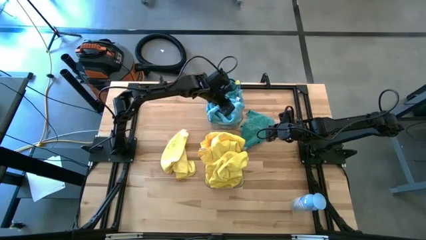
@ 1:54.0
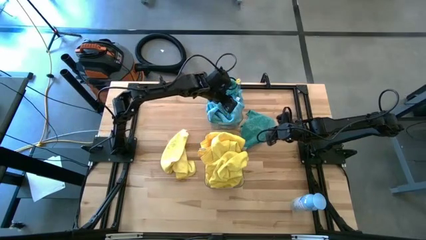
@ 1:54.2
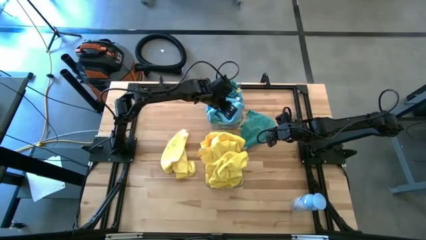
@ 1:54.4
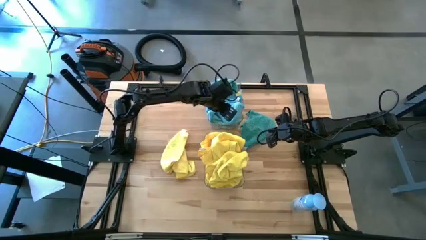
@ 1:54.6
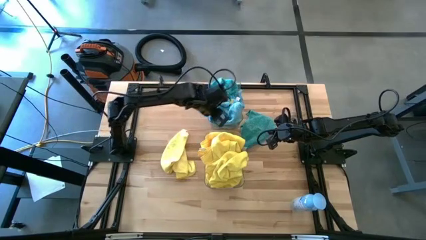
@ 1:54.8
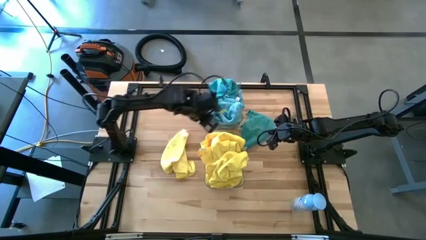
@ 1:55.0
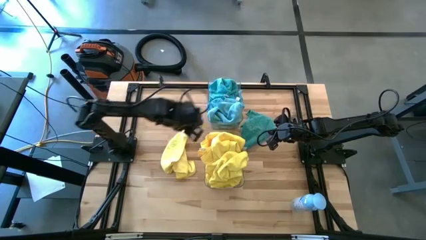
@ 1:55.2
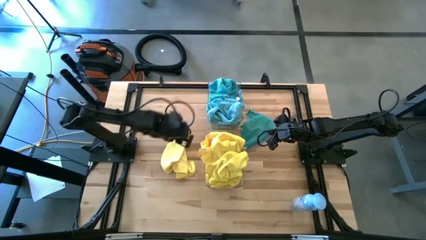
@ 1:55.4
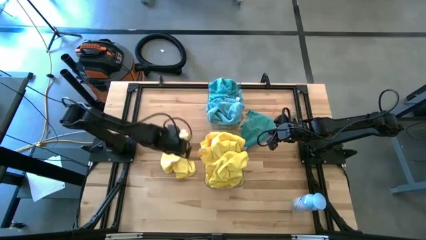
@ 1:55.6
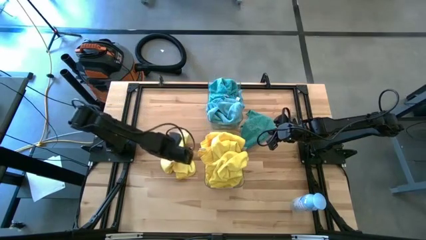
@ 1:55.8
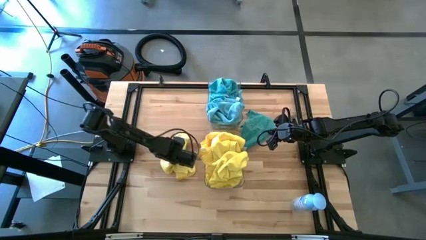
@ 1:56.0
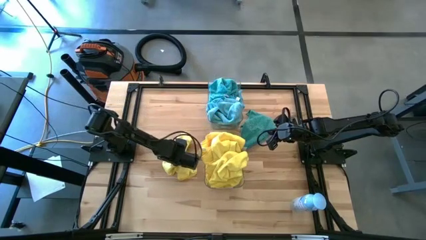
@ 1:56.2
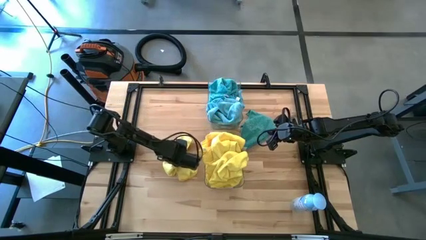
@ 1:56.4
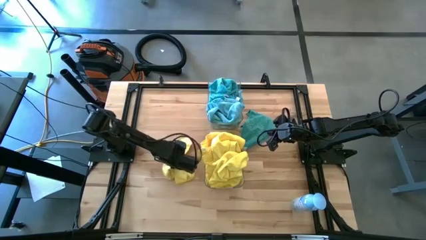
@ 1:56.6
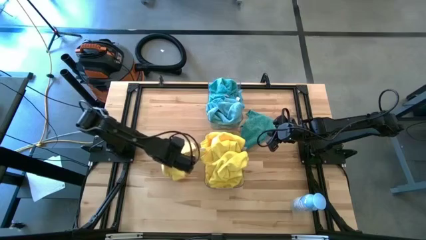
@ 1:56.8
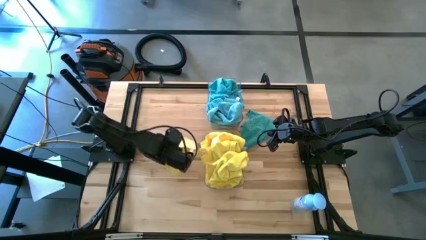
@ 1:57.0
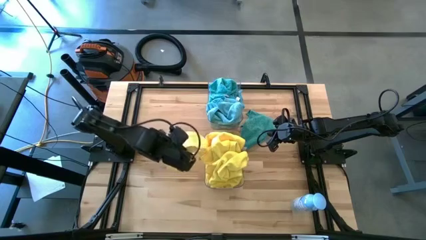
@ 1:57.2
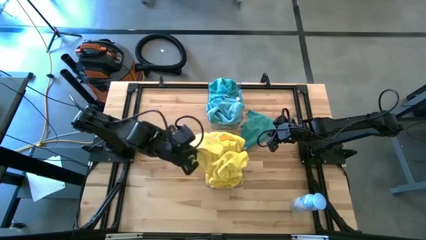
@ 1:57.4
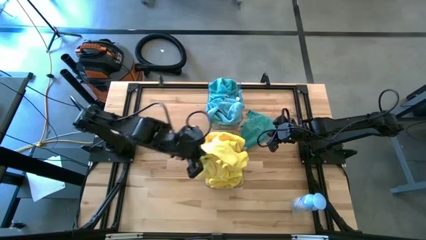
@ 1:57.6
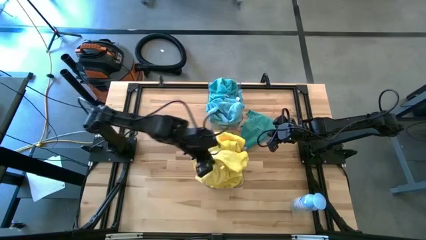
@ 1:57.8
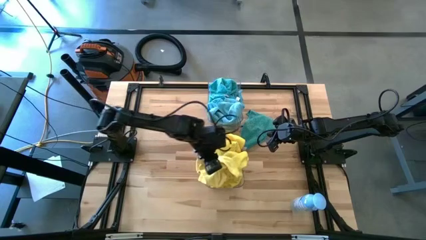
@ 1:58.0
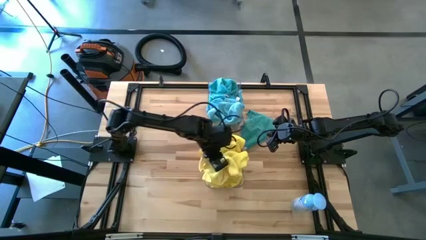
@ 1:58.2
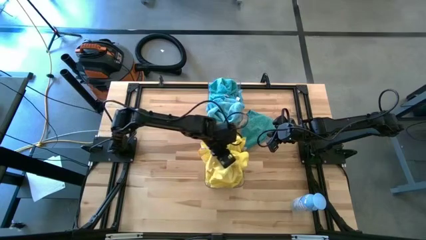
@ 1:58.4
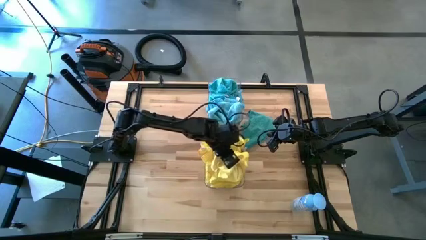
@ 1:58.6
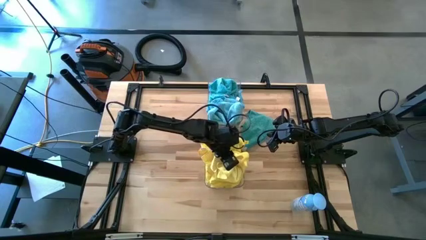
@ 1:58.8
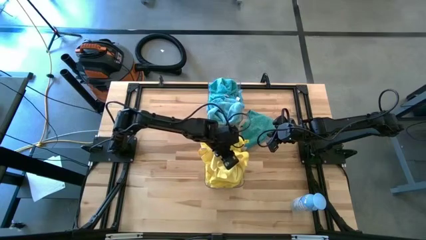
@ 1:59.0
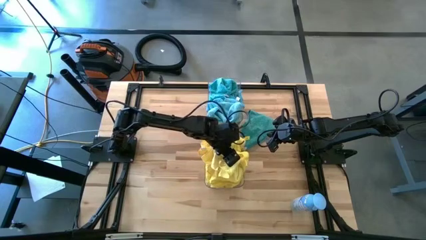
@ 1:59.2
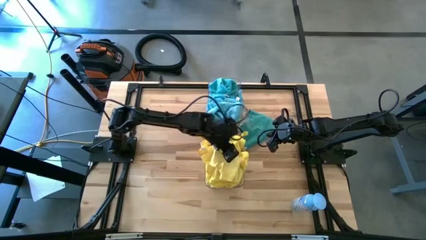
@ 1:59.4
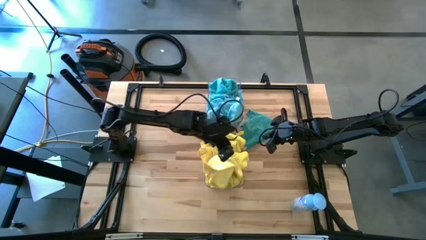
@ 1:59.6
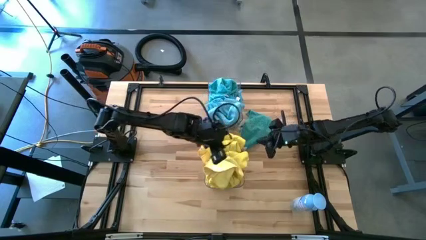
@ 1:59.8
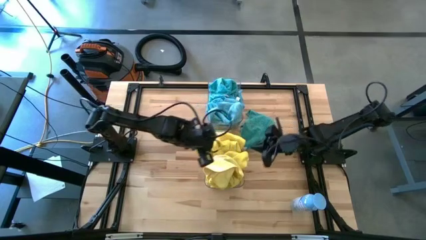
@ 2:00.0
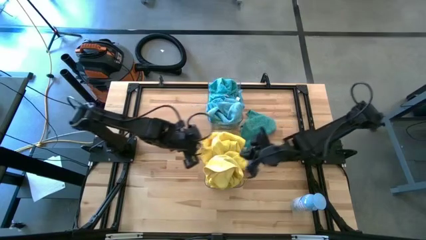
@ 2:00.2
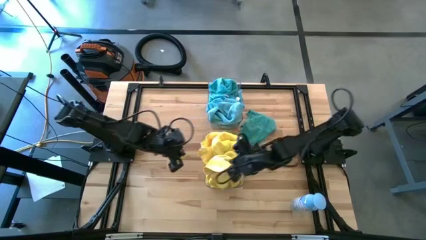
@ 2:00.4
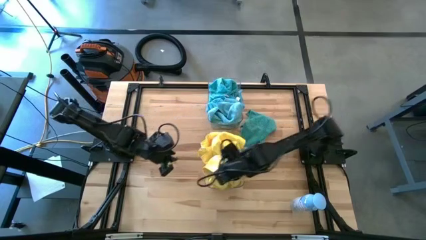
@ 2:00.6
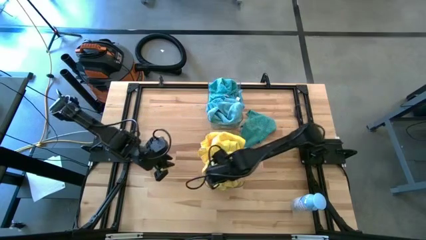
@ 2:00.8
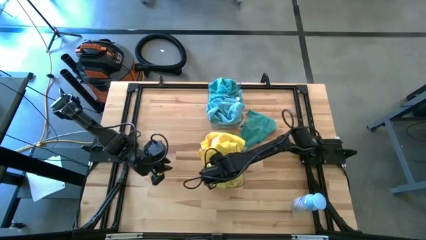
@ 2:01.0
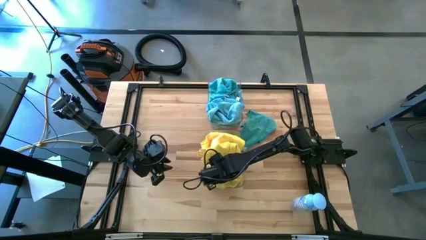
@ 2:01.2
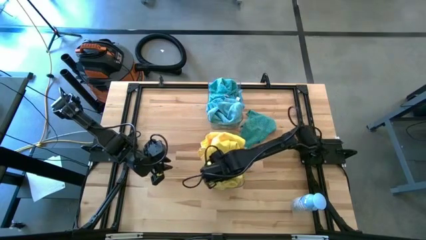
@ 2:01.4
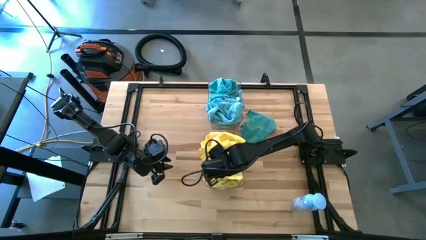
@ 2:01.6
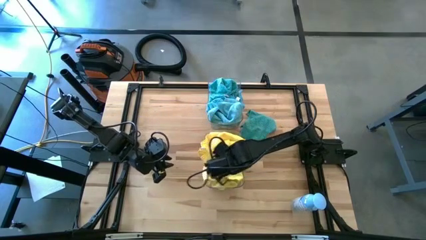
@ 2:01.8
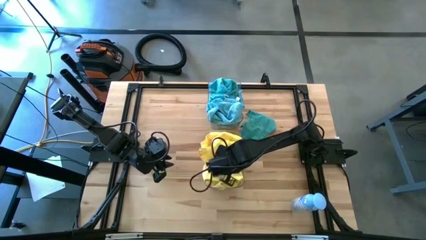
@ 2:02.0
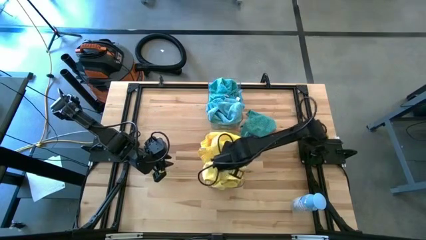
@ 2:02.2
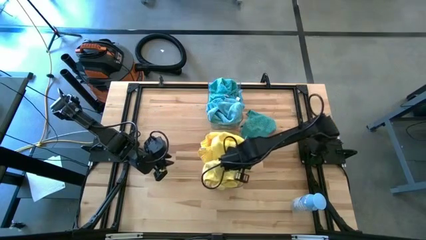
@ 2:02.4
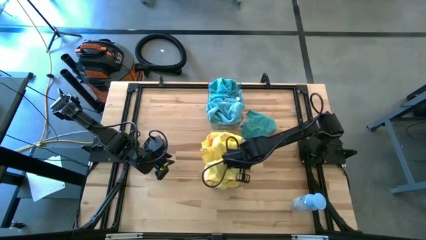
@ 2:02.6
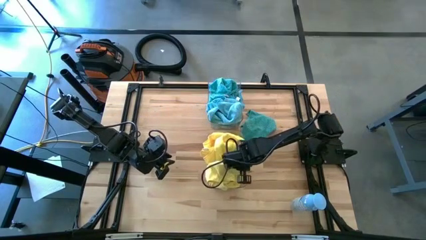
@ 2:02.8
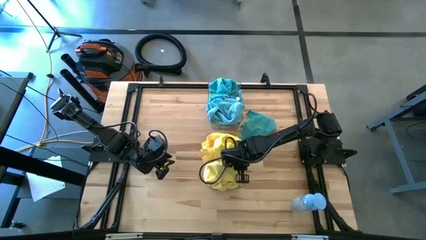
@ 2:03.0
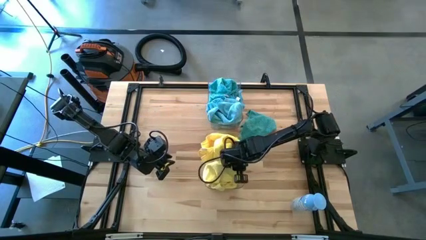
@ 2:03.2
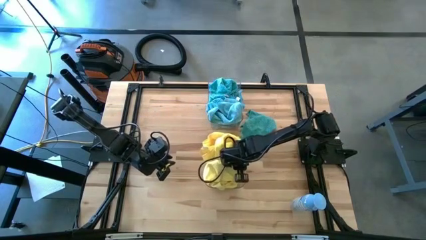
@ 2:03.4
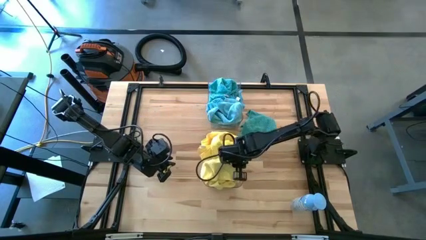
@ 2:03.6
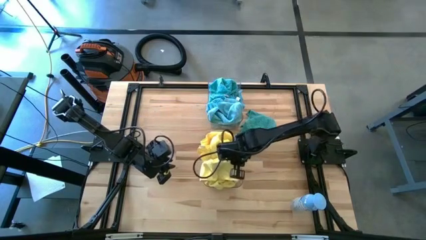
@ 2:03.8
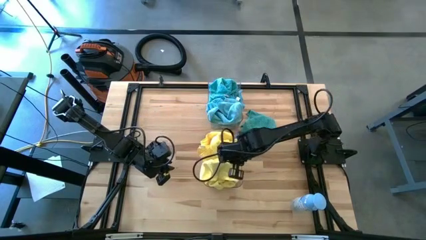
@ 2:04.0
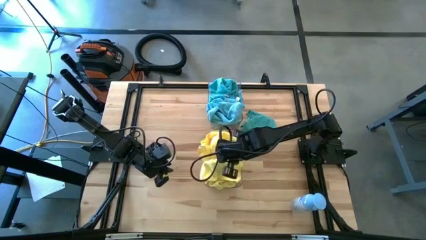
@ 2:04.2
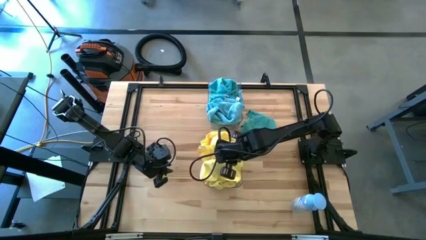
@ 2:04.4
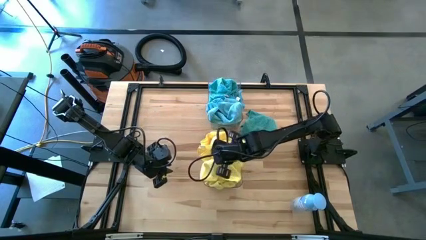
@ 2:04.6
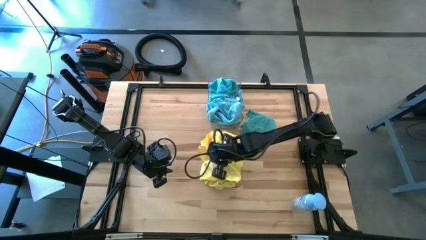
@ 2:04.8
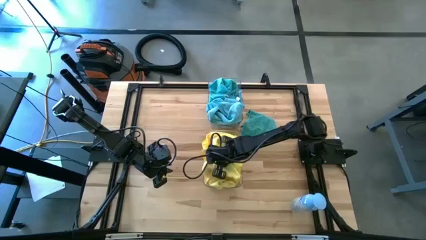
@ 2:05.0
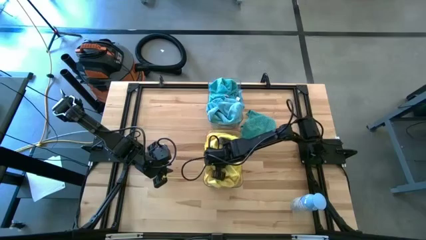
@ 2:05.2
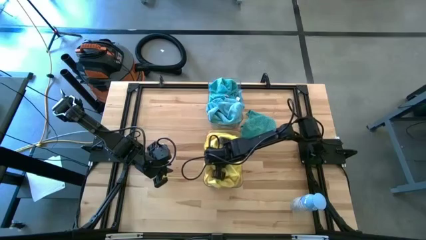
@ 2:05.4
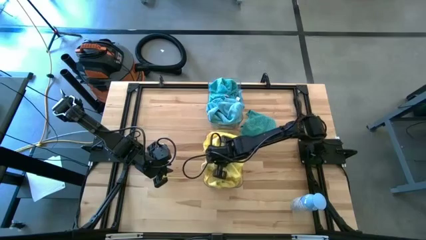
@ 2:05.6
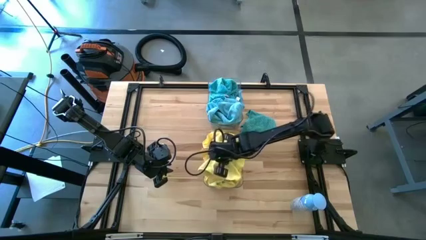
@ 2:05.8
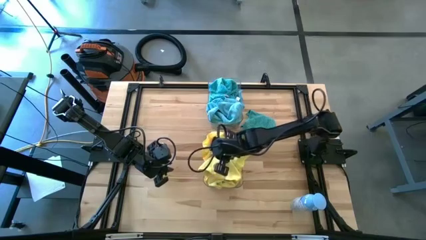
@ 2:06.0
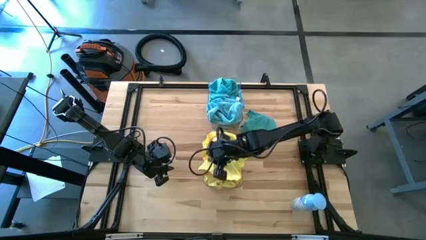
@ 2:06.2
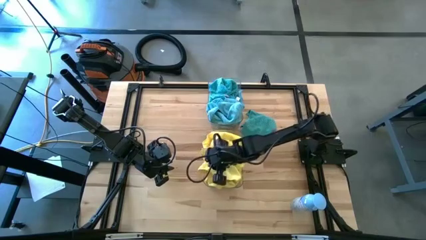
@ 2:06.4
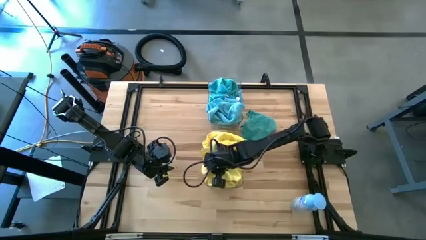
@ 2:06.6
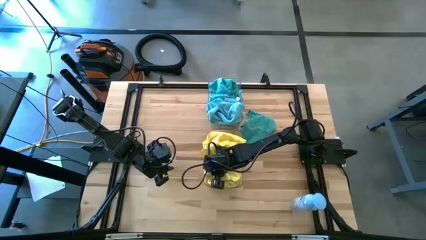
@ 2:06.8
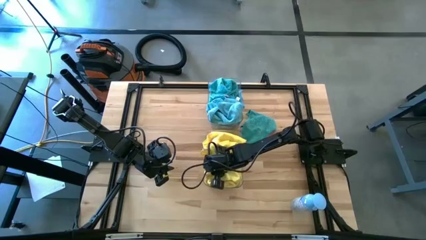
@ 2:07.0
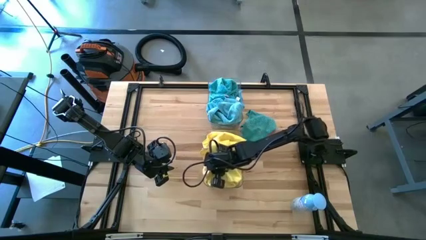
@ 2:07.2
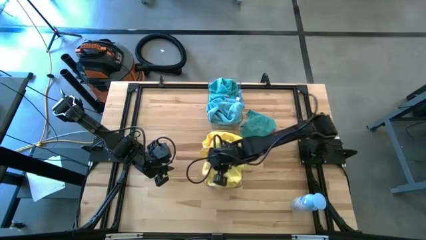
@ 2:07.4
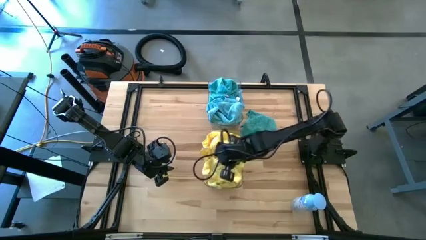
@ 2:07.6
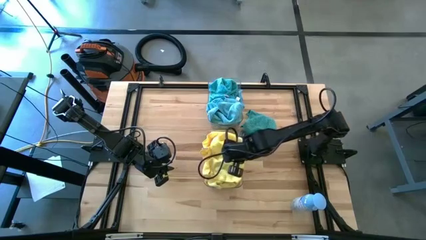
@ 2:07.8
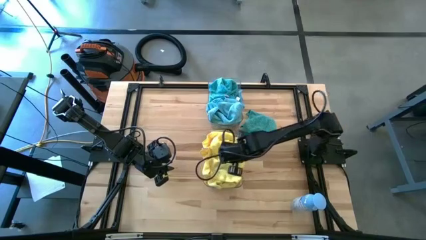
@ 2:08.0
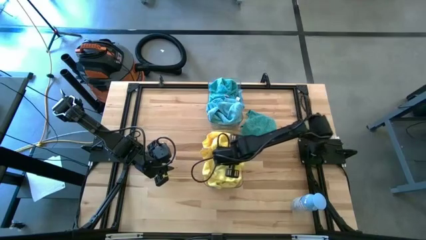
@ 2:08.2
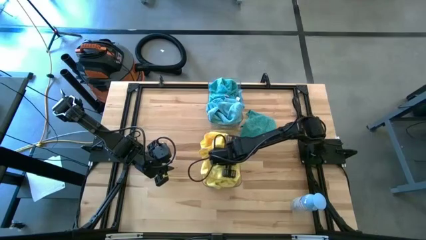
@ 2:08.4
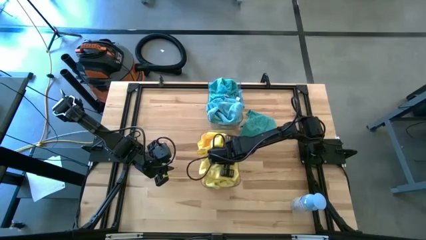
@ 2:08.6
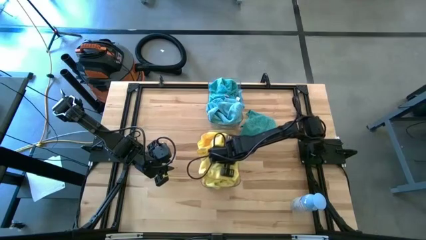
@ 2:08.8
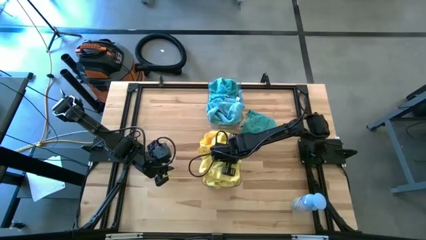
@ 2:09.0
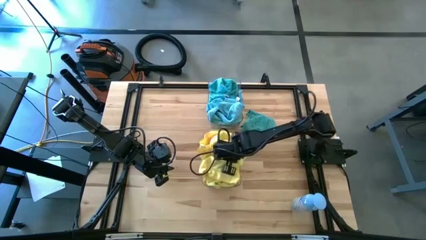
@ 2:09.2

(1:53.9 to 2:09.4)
Task: Sort microfiber towel by color & place in baskets
Put the yellow towel into the bottom transparent bin
